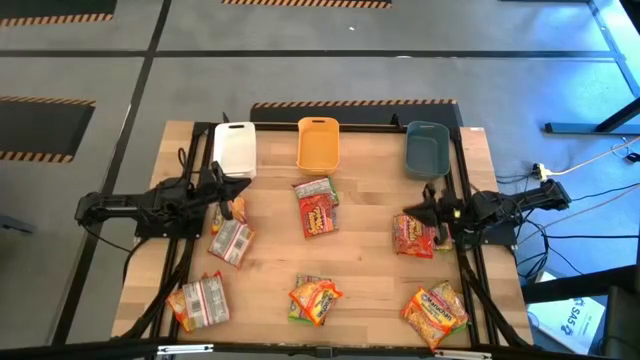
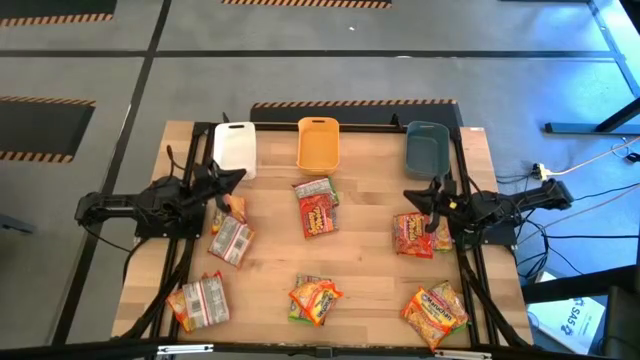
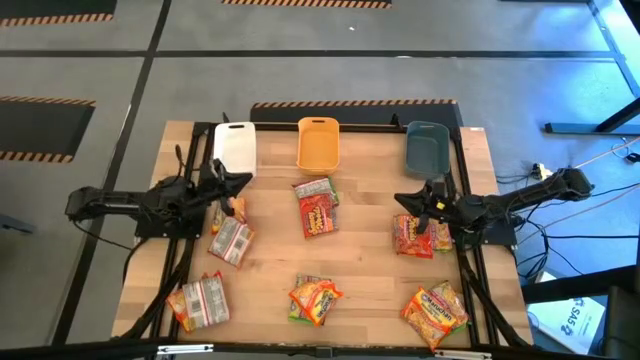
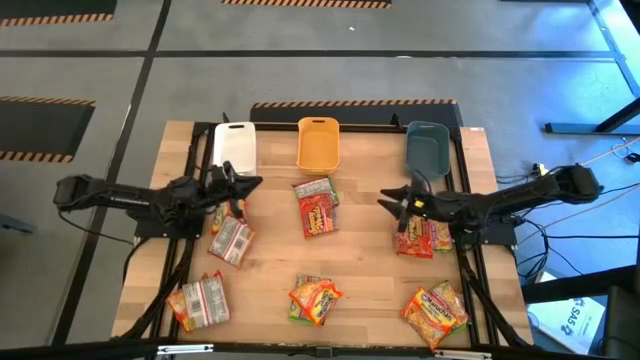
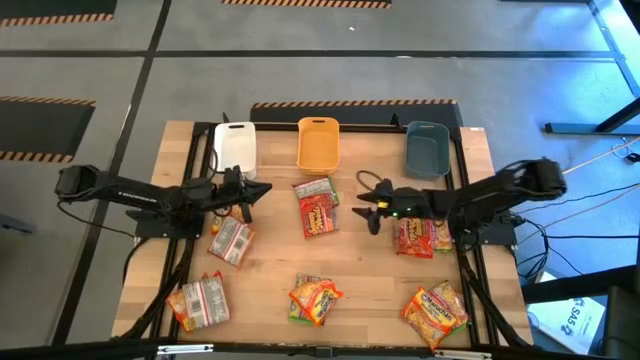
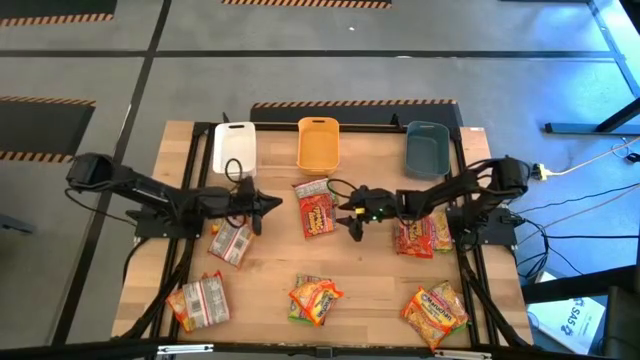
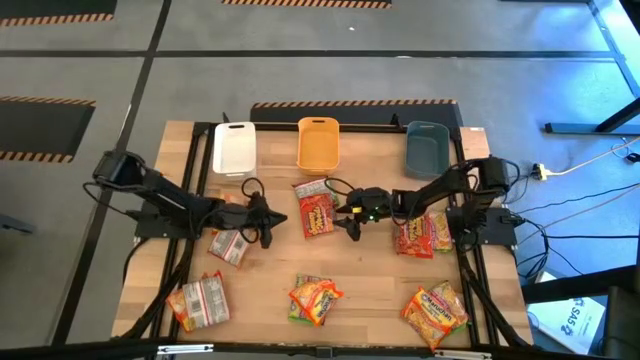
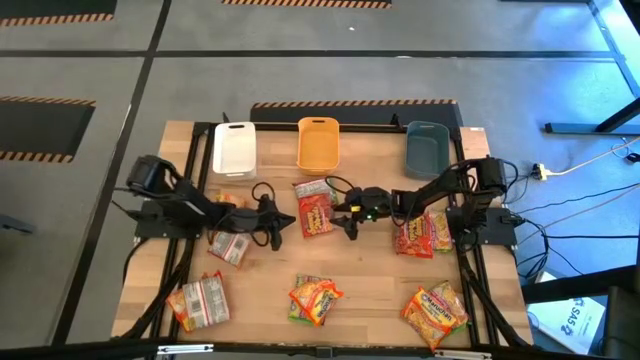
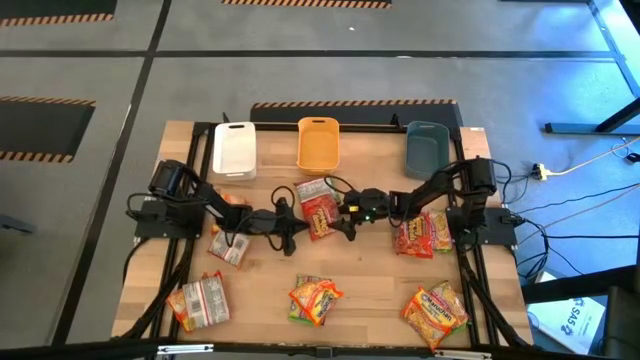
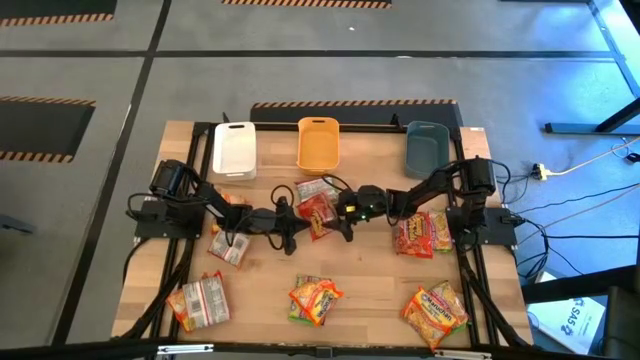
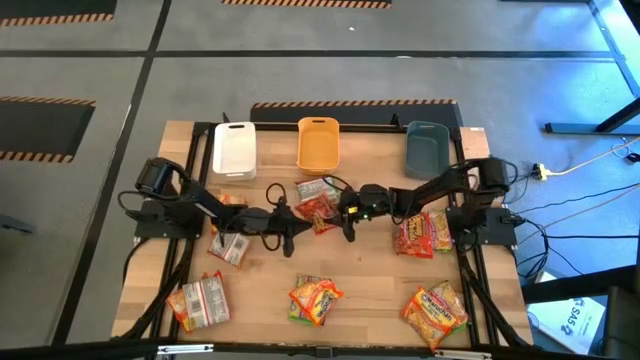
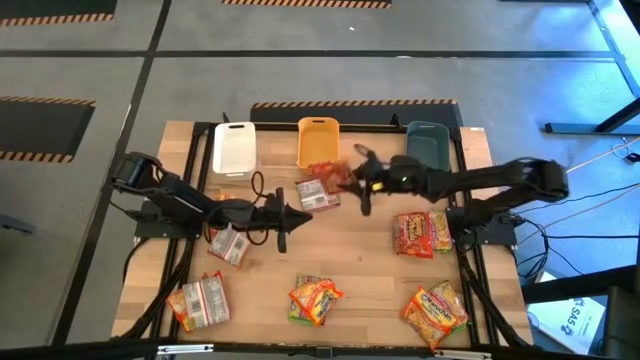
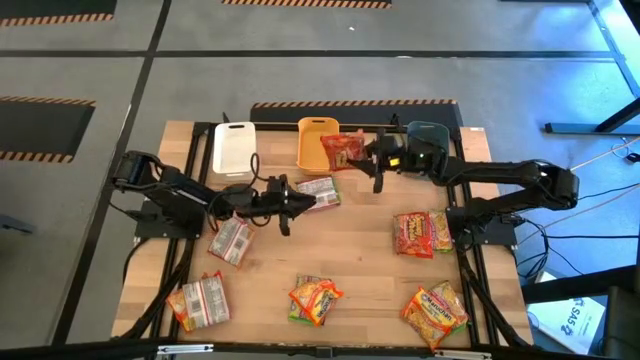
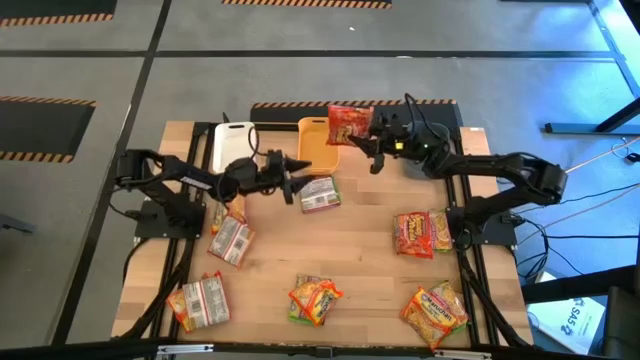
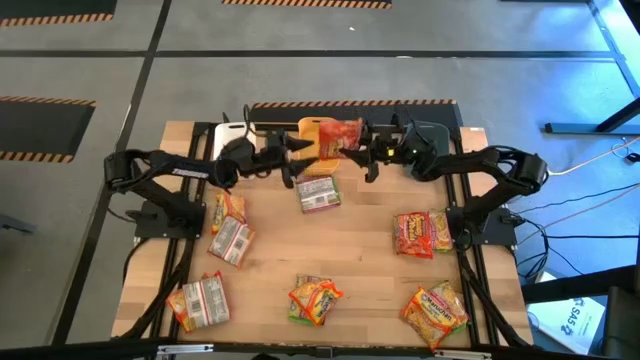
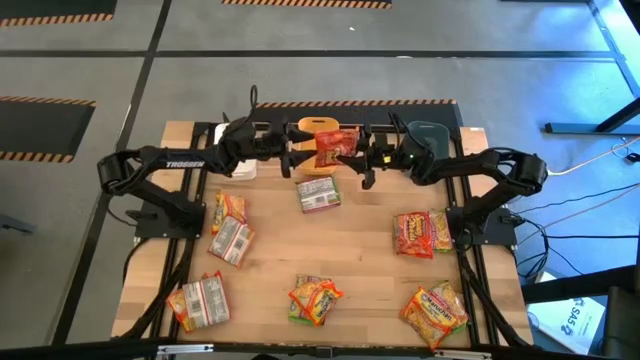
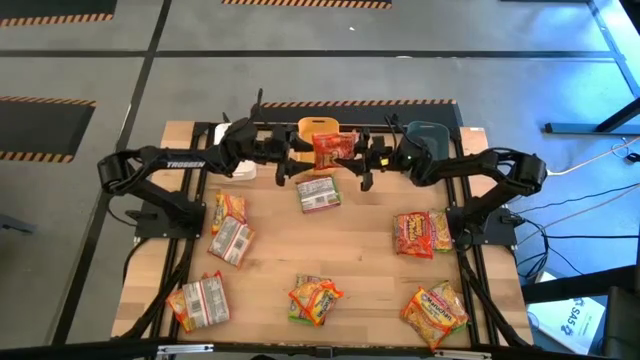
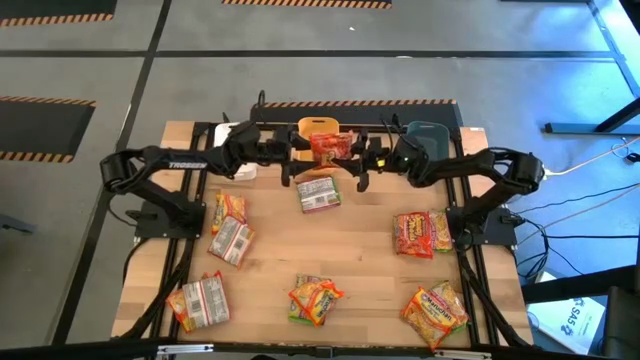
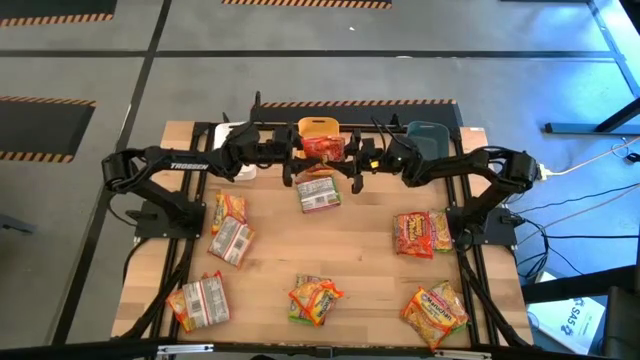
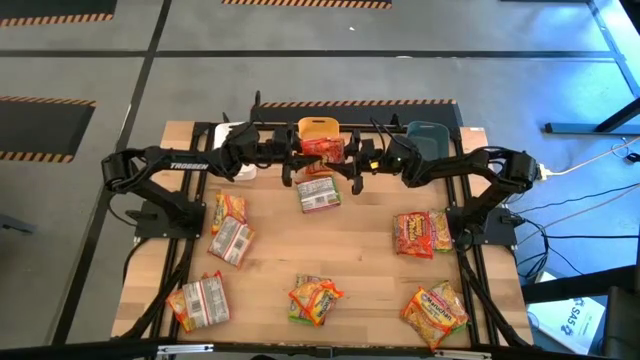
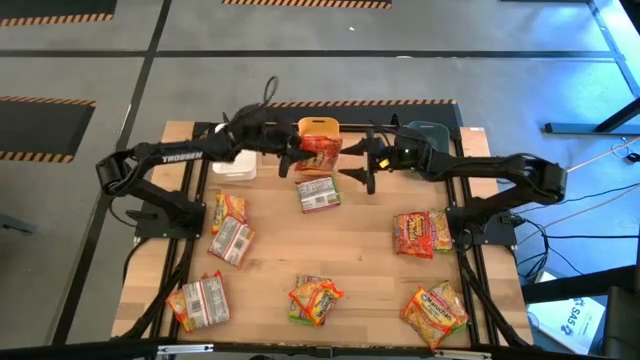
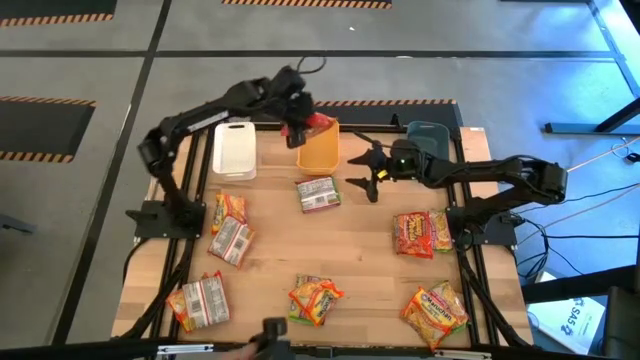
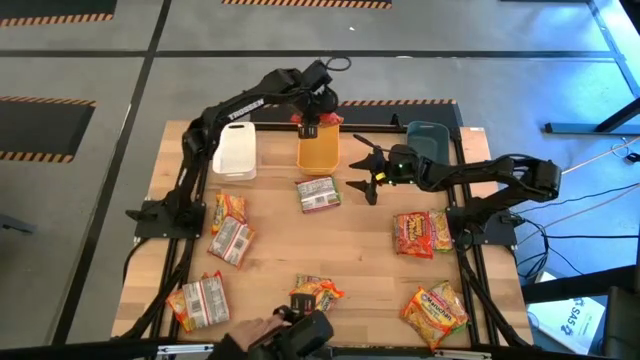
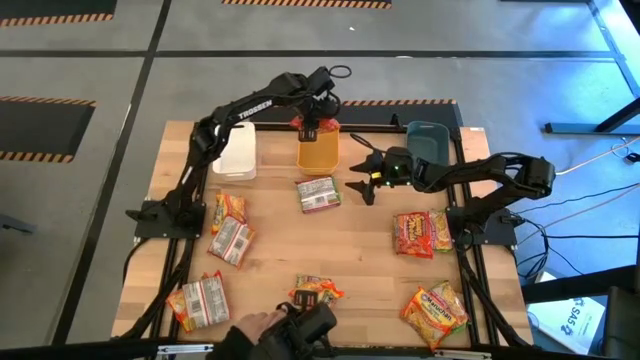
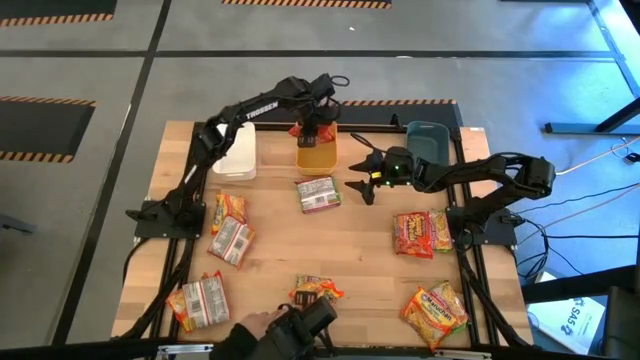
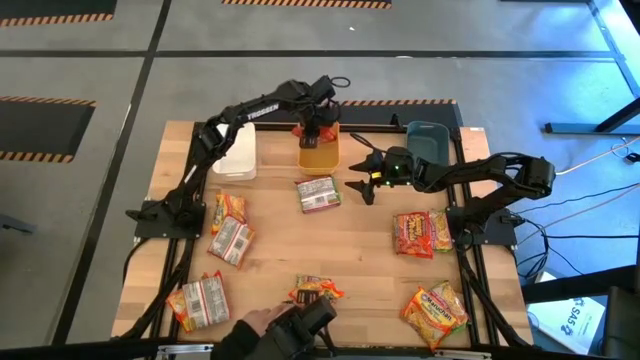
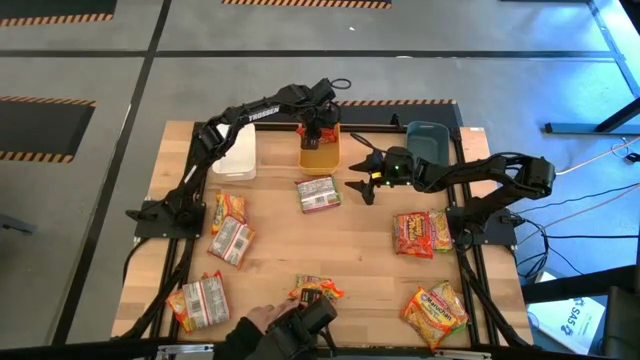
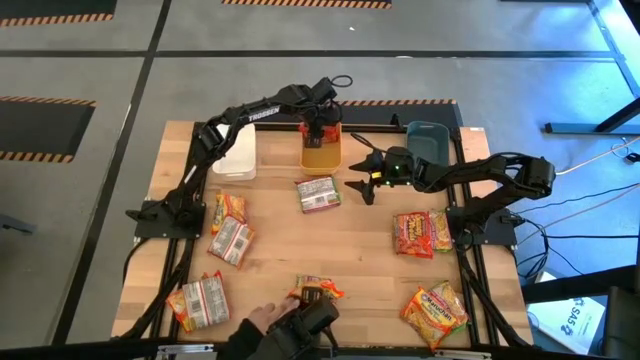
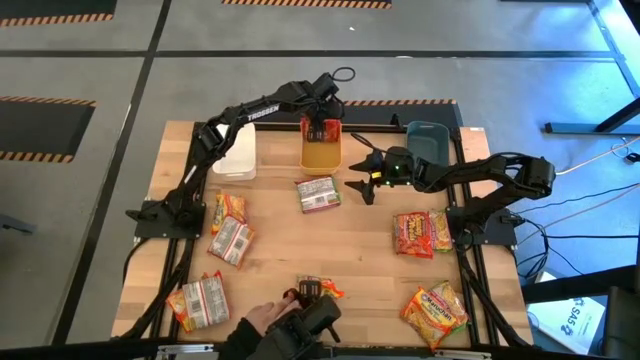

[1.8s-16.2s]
Task: Sort Maruchan noodles
Put the orange noodle pack into the yellow bin

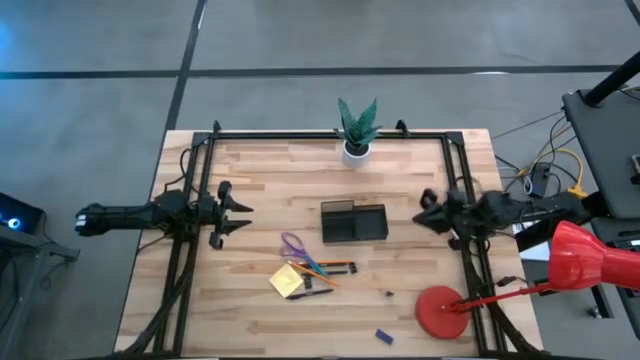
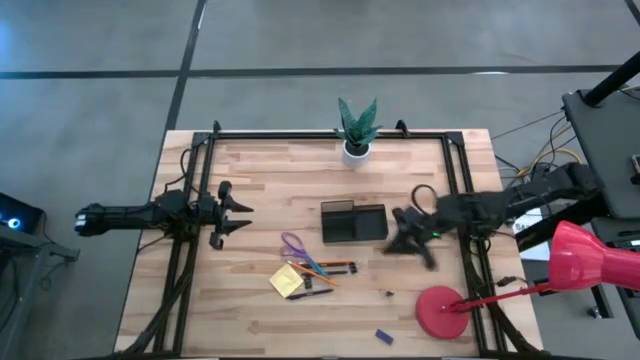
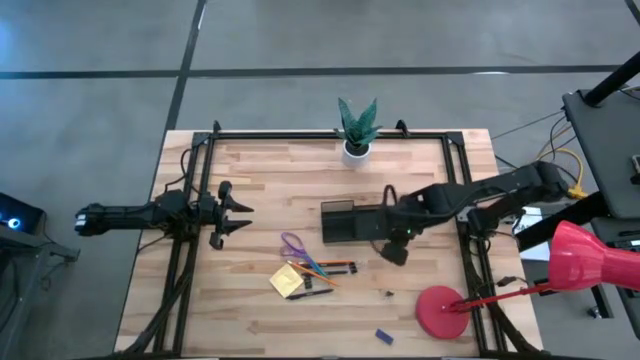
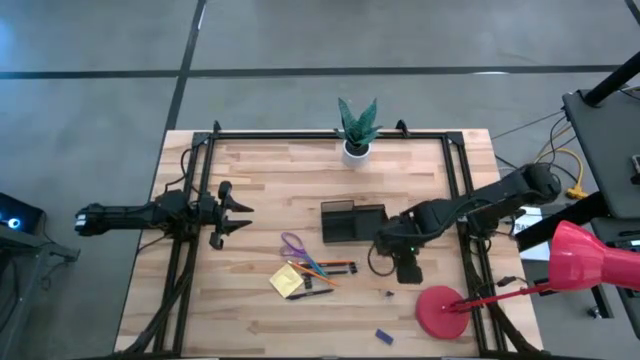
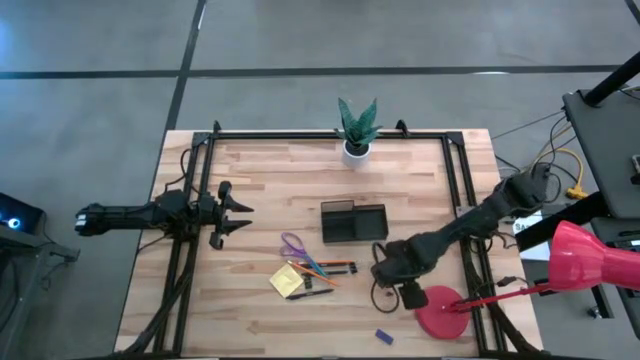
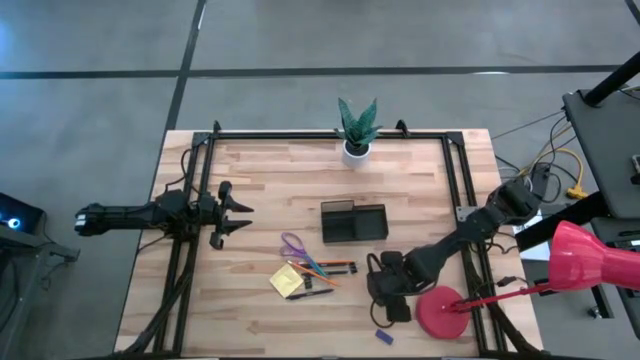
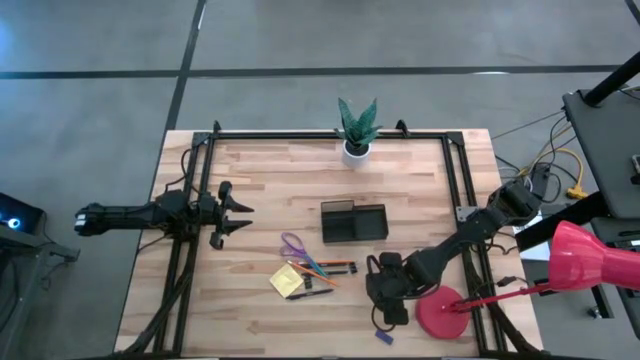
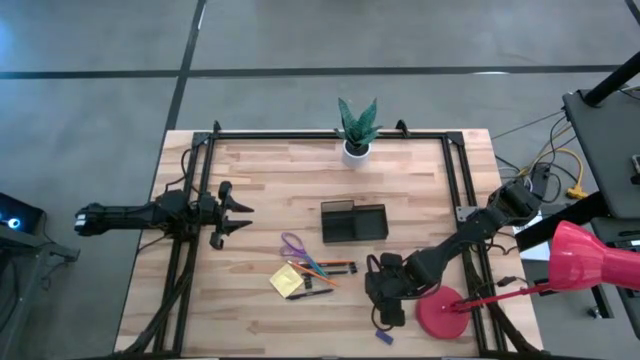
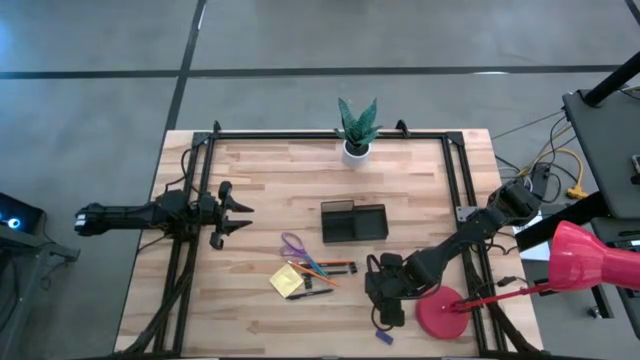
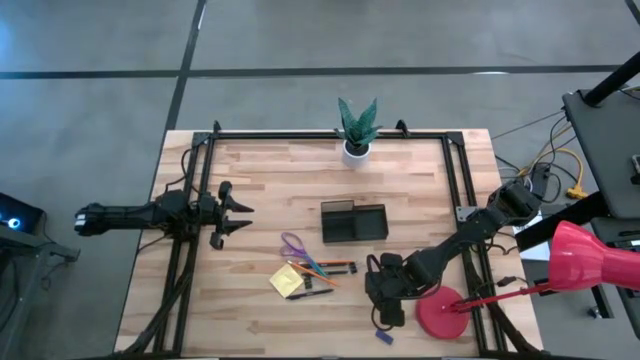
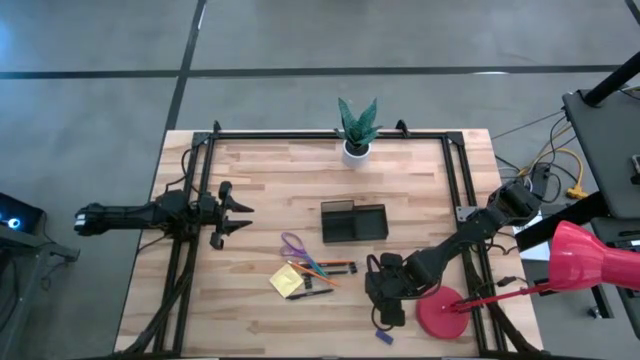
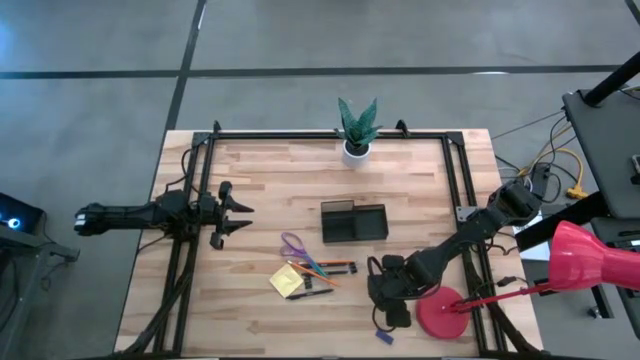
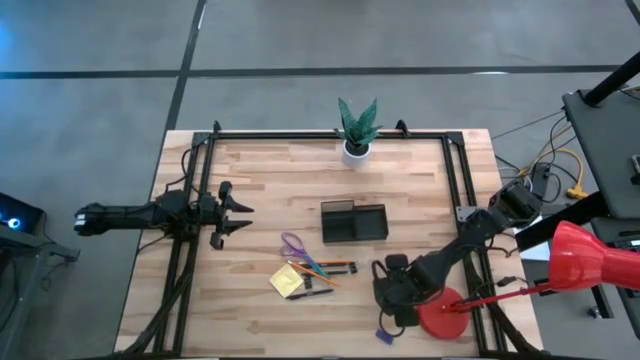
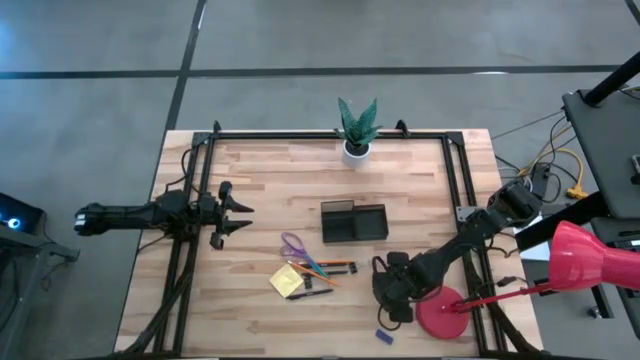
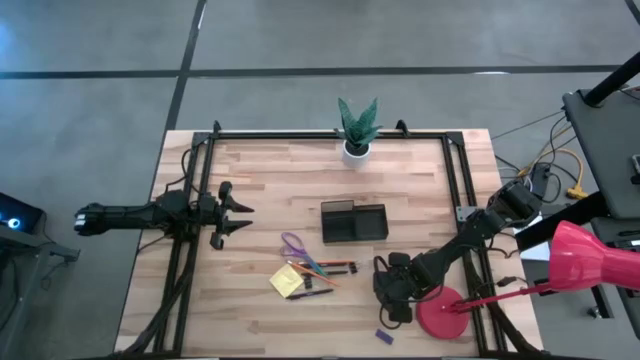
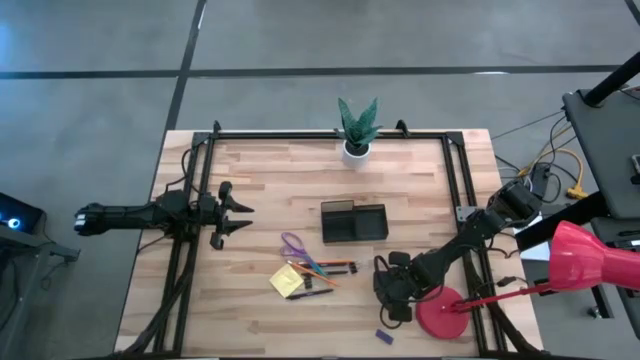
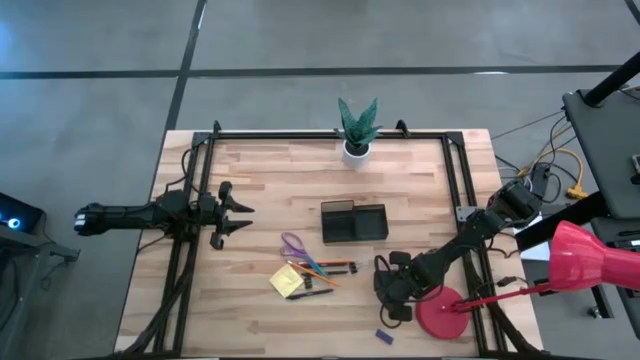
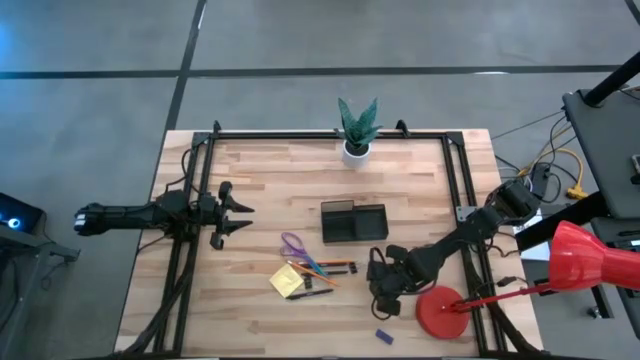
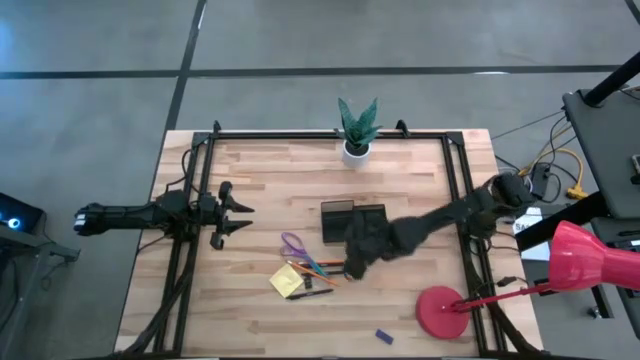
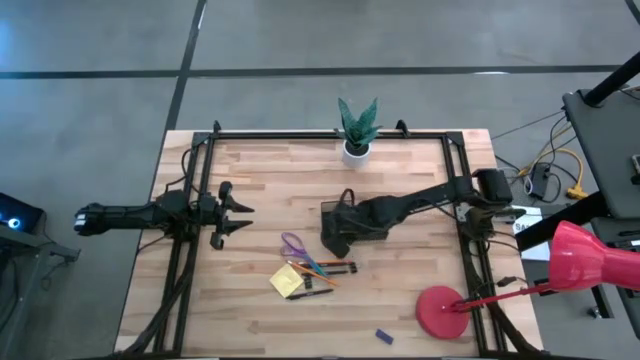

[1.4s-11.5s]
Task: Pick and place office supplies into organizer
Put the bottom black clip into the black organizer
